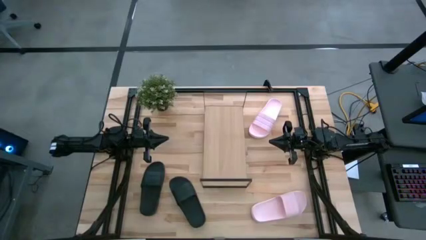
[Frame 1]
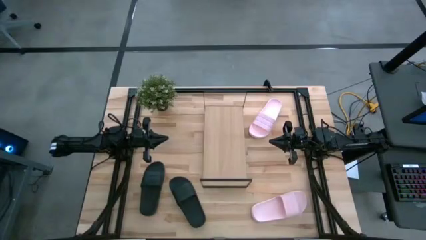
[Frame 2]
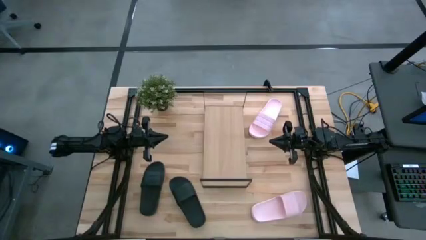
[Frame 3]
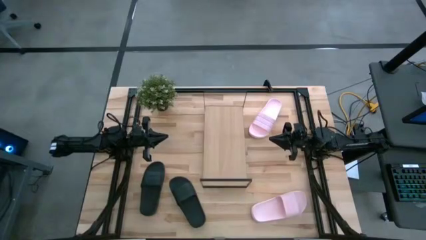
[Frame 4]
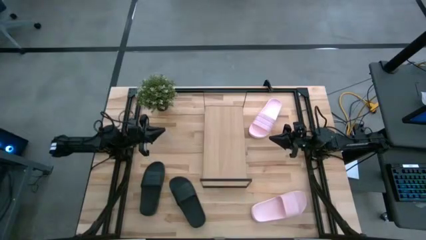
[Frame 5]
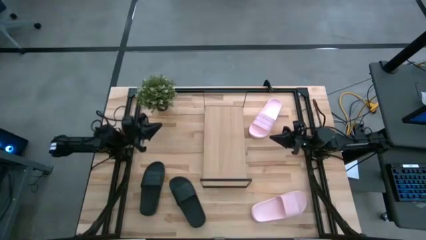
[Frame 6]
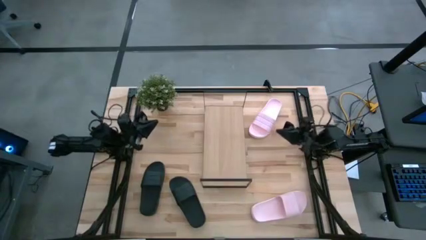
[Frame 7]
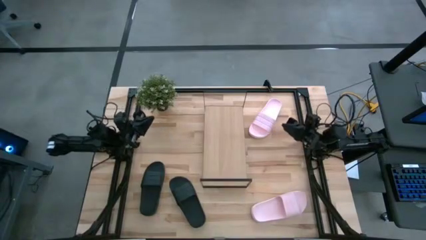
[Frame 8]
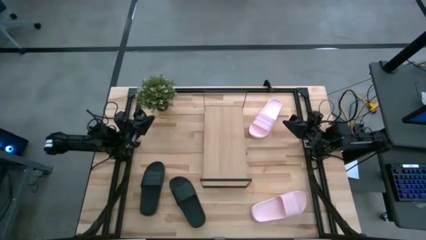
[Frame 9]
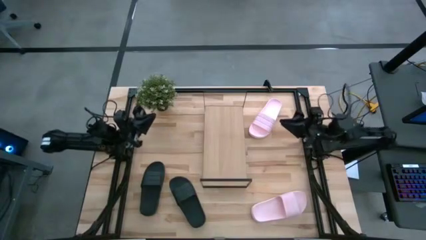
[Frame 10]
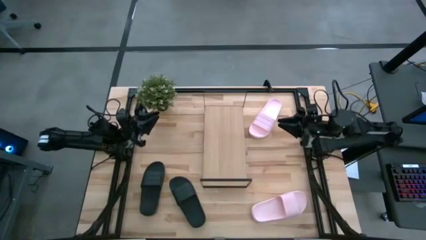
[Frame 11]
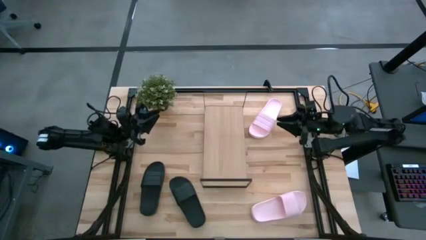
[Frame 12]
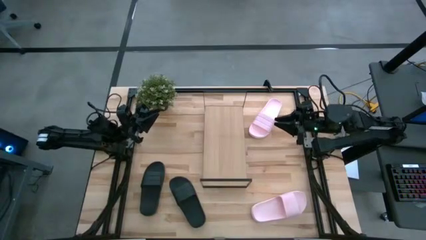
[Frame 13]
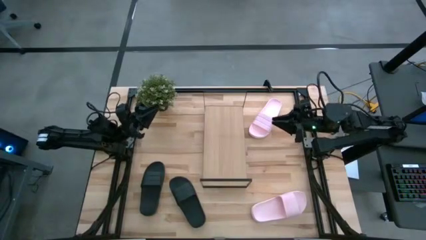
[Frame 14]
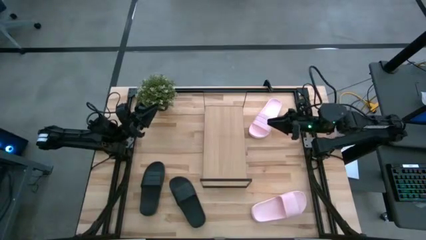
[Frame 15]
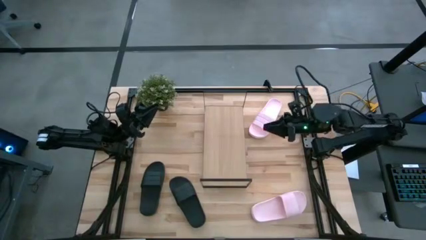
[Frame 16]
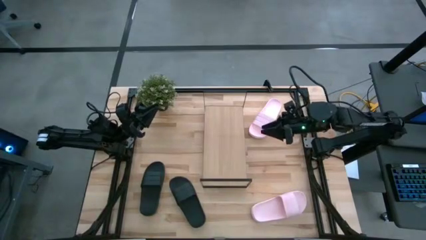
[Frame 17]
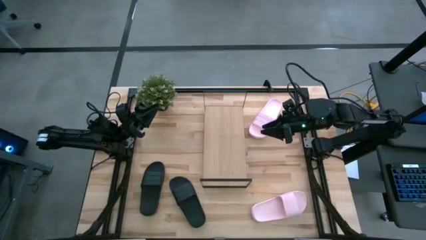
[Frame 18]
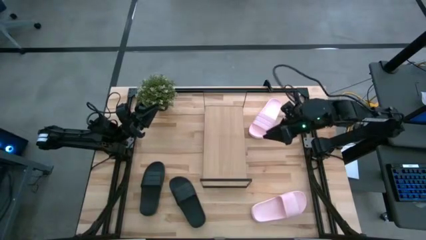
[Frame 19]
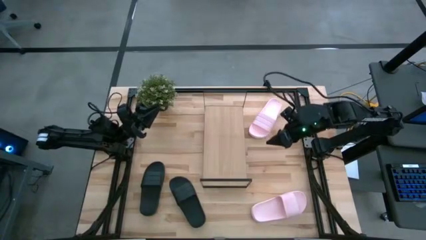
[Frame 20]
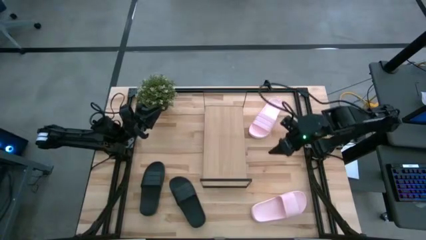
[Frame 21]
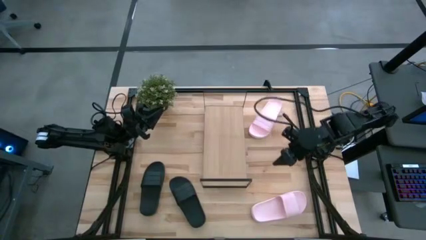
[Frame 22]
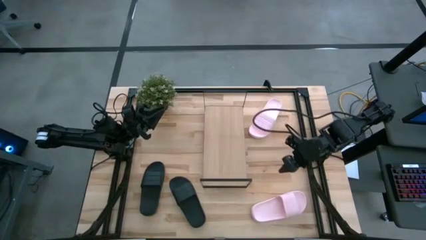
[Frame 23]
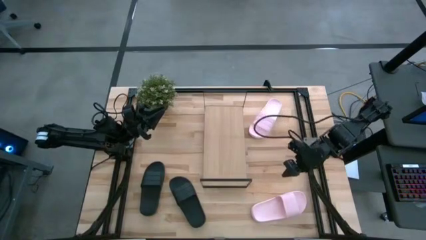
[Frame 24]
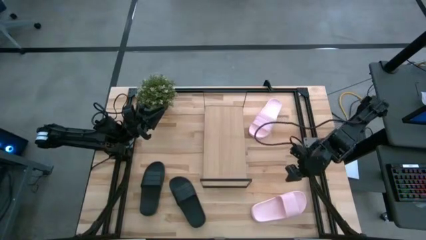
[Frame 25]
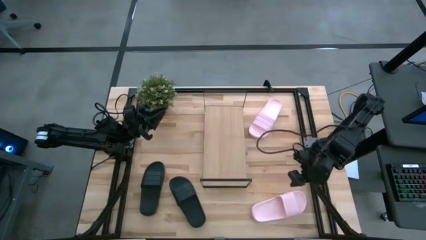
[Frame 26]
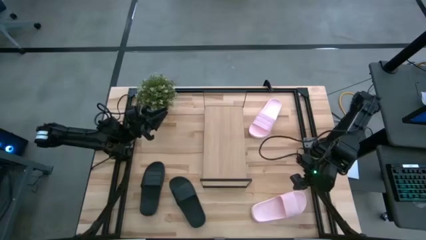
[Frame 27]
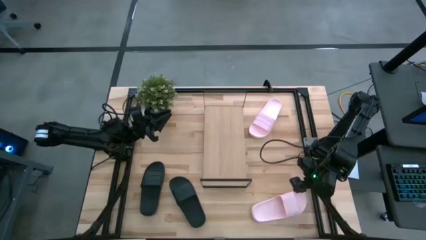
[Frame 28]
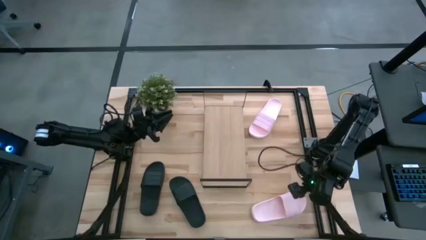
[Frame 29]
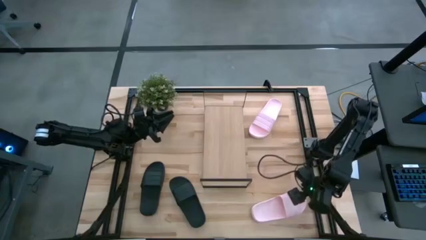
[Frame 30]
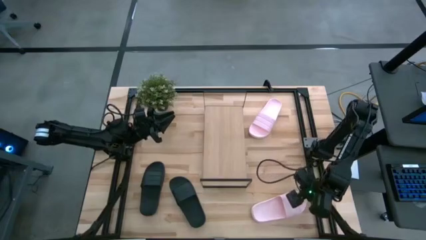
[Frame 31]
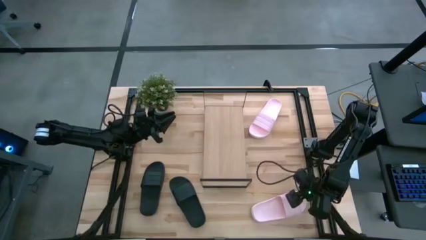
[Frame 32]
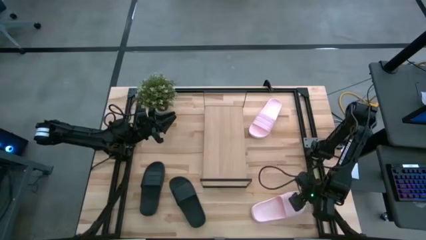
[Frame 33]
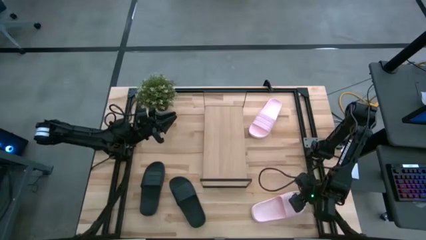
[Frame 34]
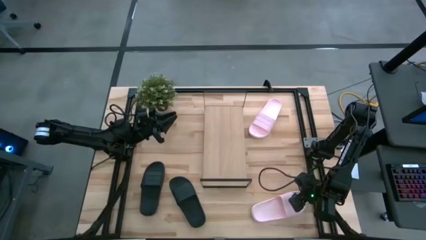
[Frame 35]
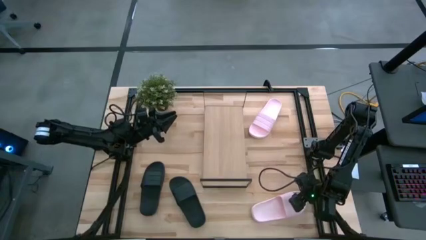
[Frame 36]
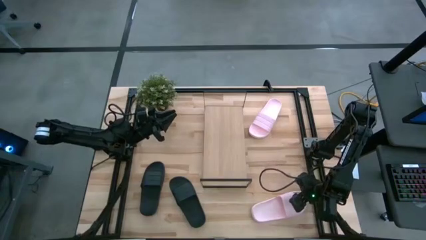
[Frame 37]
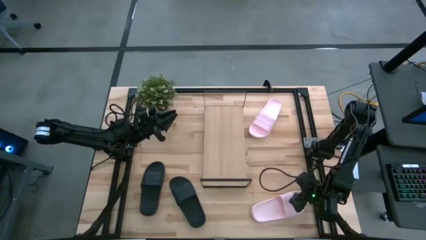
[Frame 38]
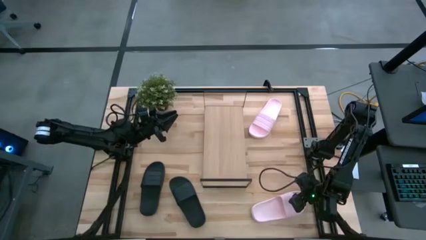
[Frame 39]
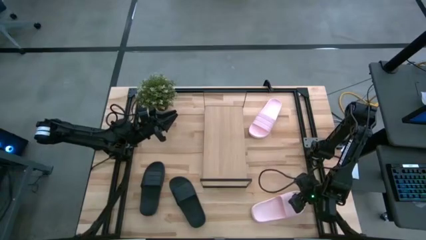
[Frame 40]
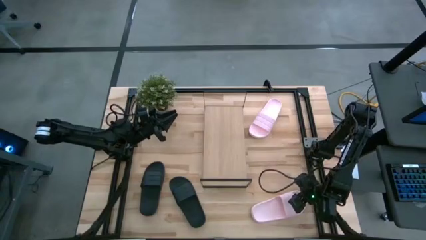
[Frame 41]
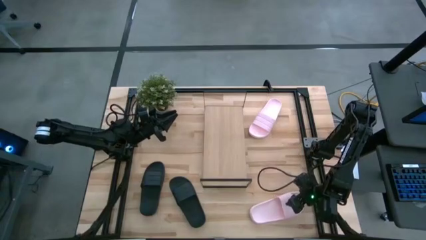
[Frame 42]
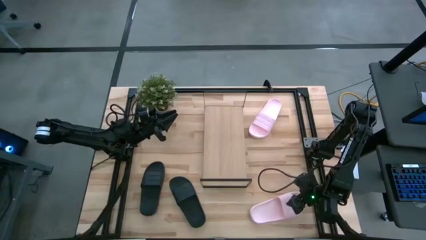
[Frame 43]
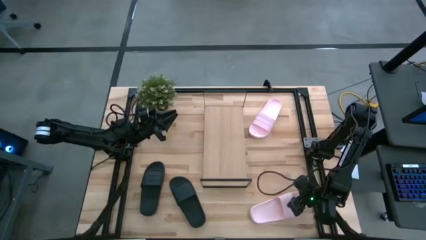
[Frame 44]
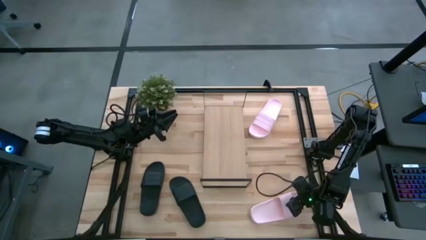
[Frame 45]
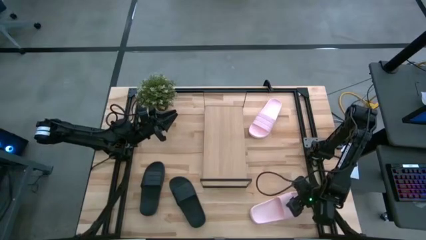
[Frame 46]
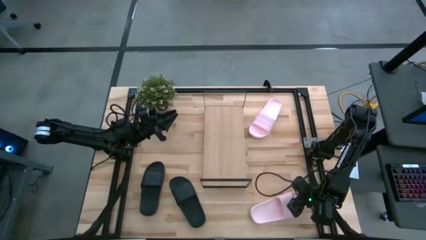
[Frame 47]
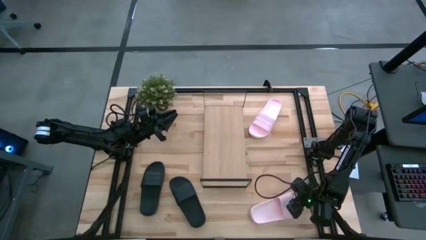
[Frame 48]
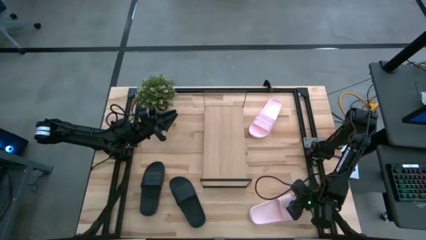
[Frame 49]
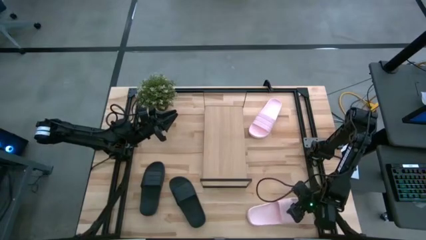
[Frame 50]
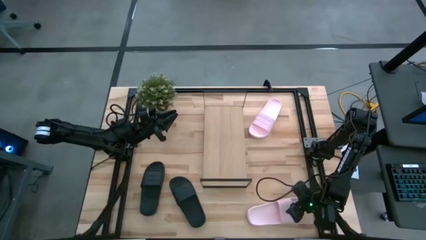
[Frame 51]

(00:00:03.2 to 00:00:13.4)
Task: Pick and place slides into the shelf
Put the bottom pink slide on the shelf
